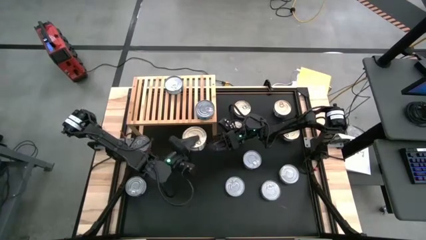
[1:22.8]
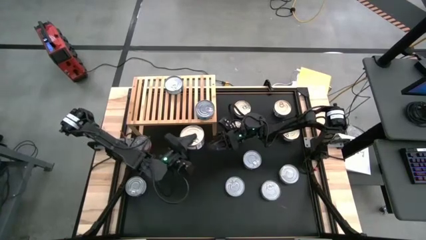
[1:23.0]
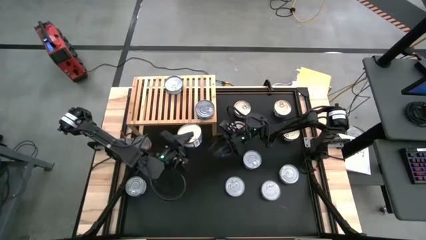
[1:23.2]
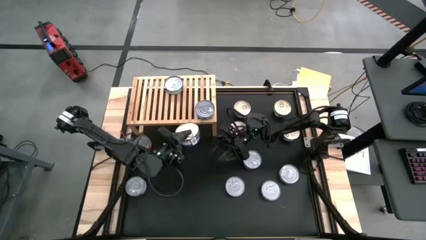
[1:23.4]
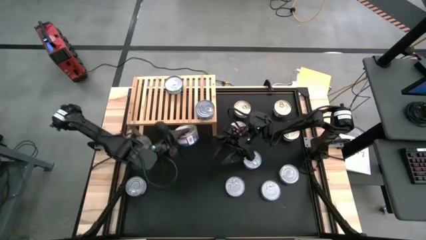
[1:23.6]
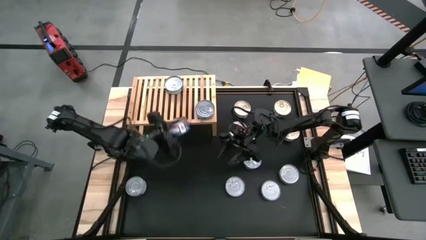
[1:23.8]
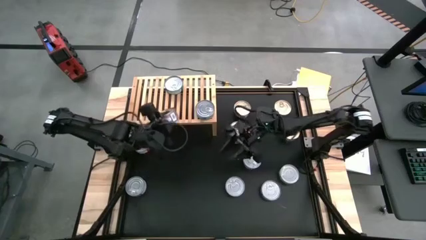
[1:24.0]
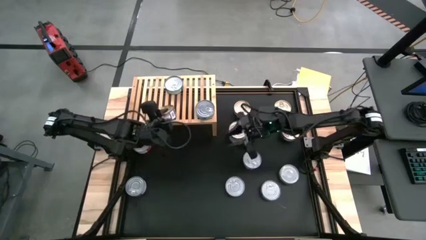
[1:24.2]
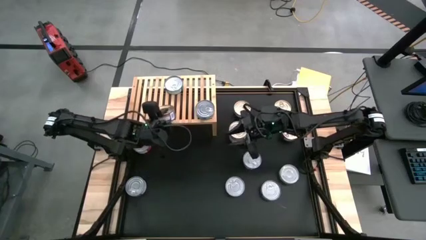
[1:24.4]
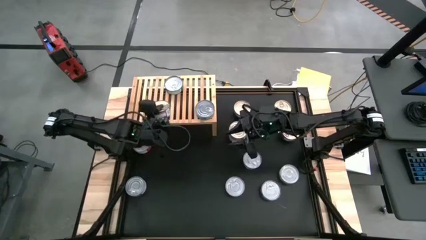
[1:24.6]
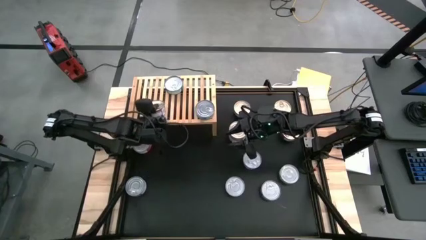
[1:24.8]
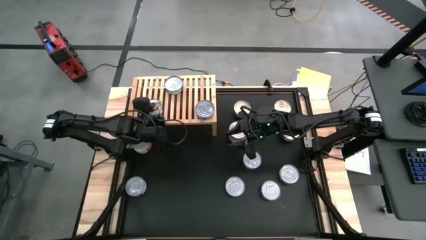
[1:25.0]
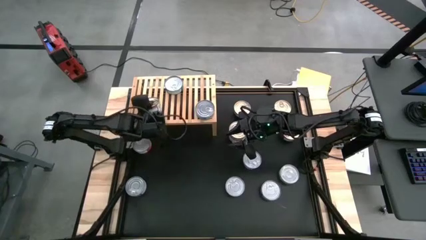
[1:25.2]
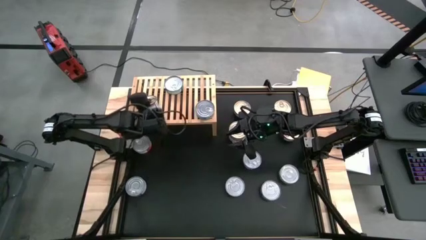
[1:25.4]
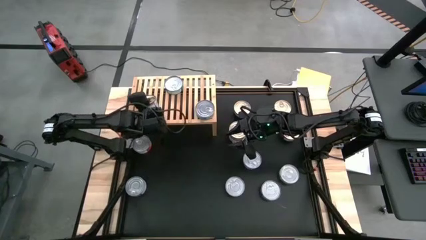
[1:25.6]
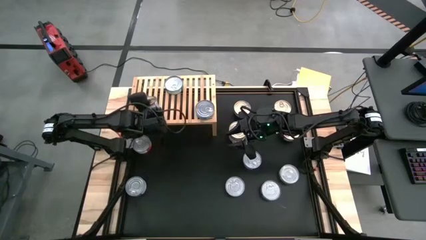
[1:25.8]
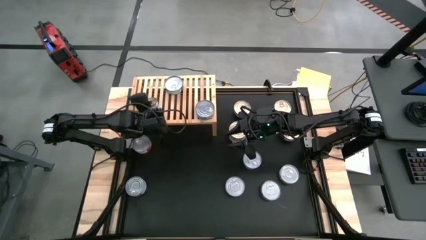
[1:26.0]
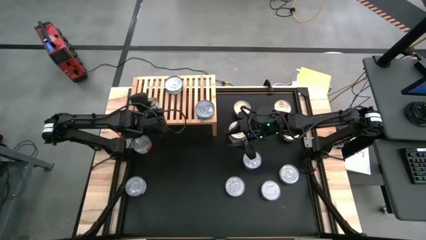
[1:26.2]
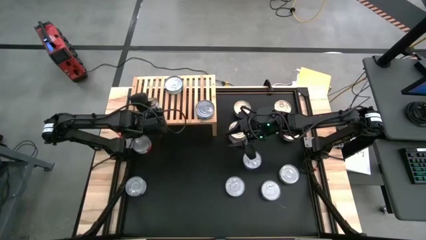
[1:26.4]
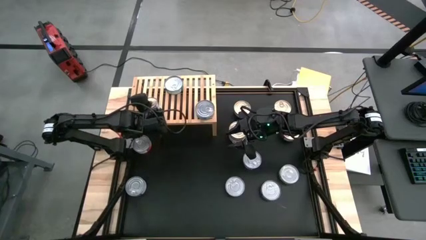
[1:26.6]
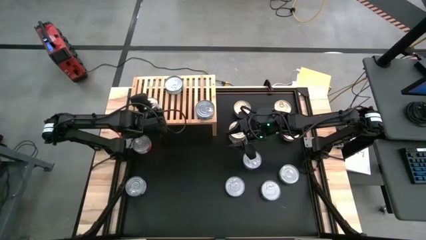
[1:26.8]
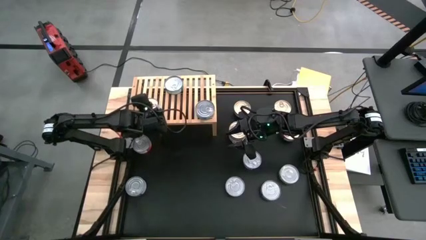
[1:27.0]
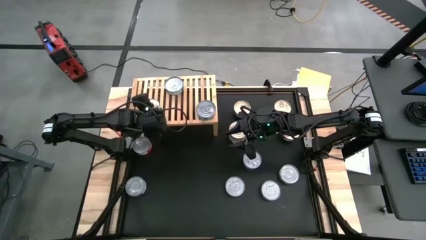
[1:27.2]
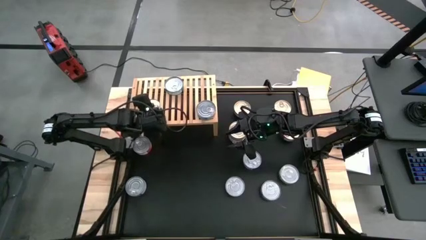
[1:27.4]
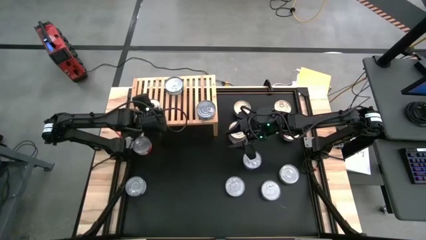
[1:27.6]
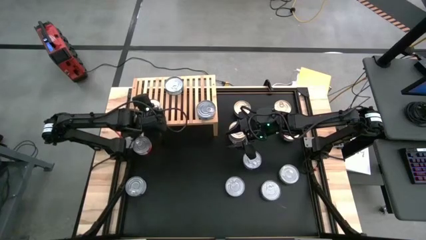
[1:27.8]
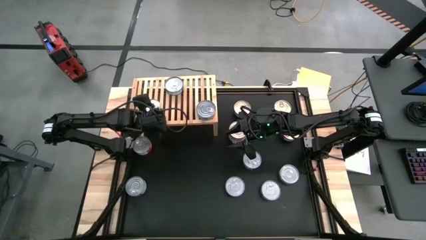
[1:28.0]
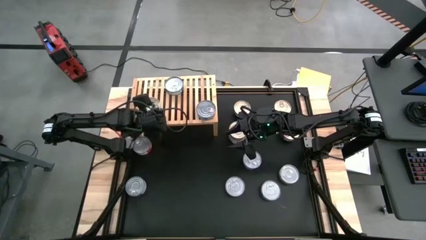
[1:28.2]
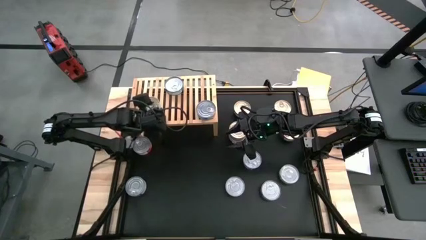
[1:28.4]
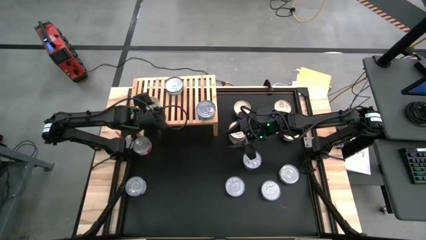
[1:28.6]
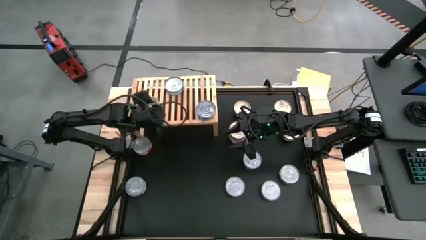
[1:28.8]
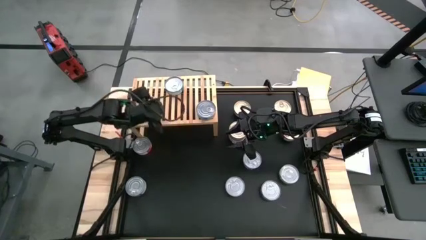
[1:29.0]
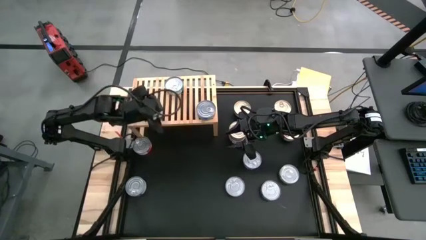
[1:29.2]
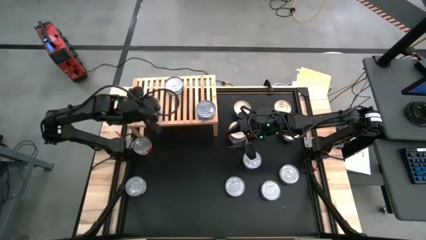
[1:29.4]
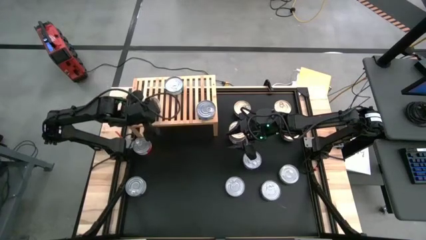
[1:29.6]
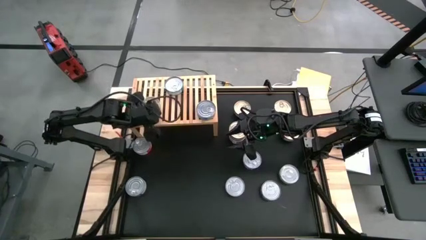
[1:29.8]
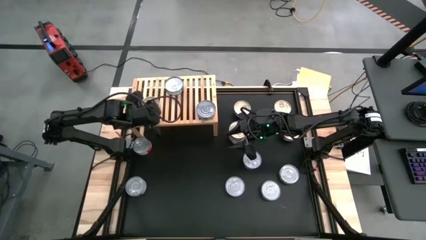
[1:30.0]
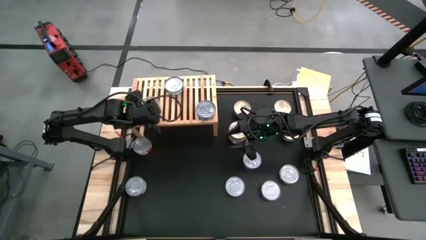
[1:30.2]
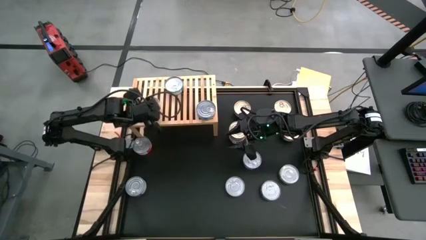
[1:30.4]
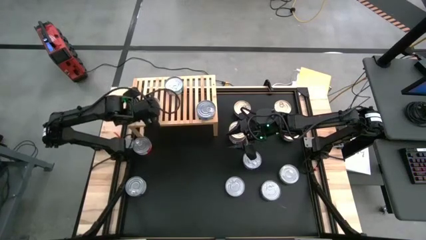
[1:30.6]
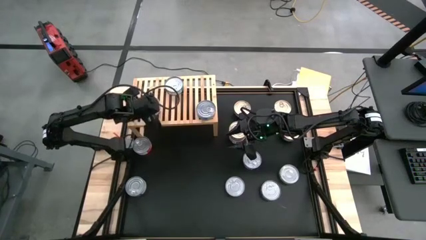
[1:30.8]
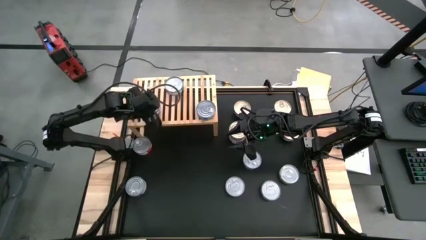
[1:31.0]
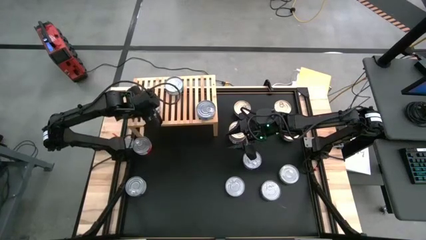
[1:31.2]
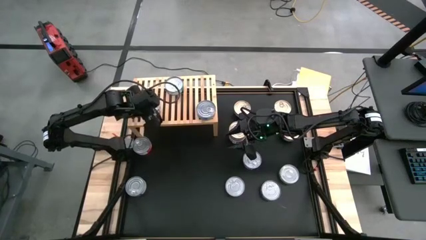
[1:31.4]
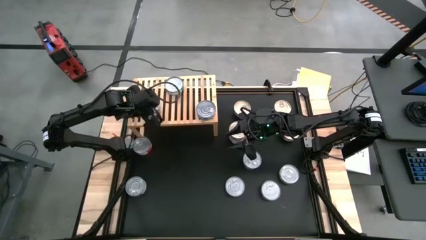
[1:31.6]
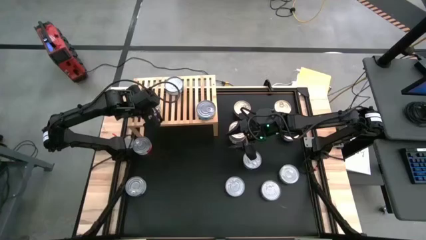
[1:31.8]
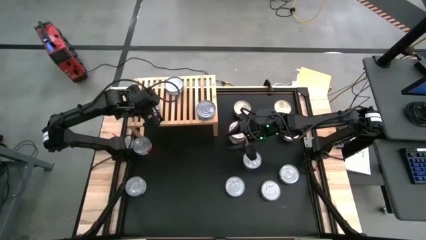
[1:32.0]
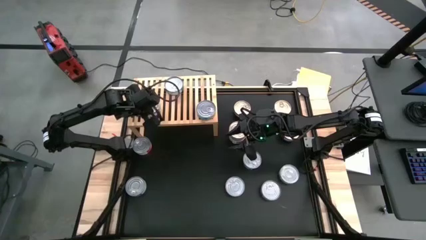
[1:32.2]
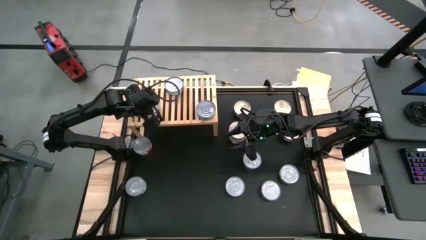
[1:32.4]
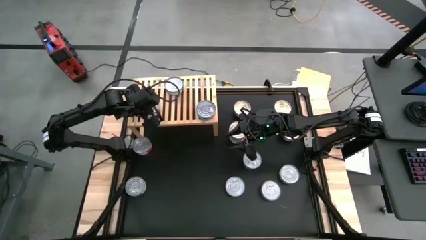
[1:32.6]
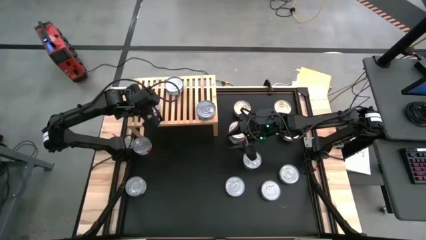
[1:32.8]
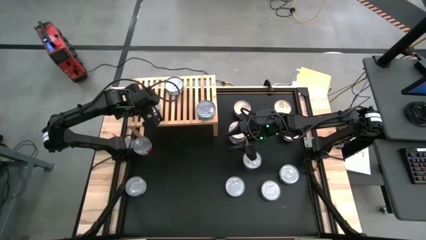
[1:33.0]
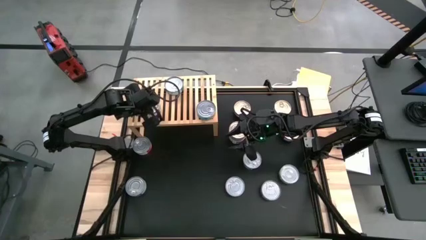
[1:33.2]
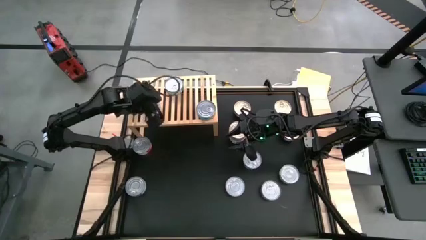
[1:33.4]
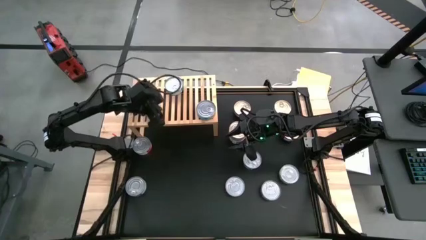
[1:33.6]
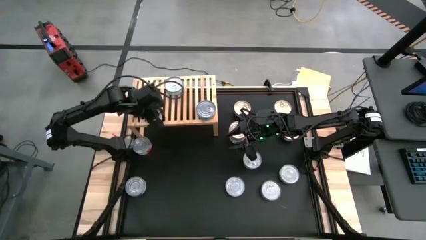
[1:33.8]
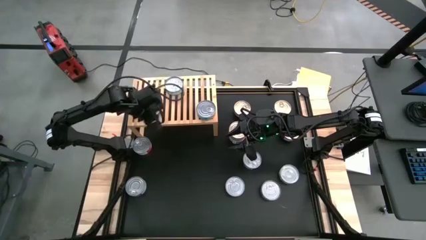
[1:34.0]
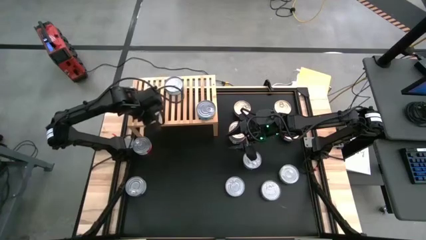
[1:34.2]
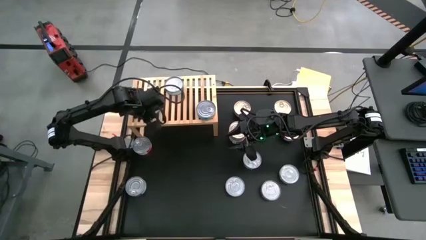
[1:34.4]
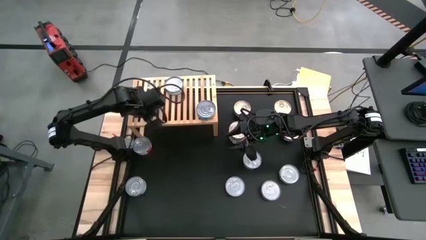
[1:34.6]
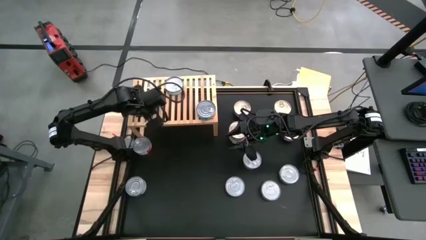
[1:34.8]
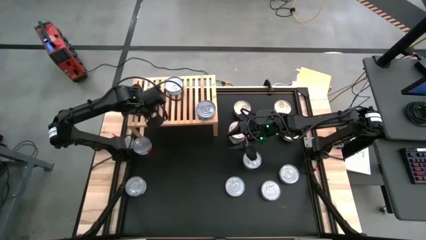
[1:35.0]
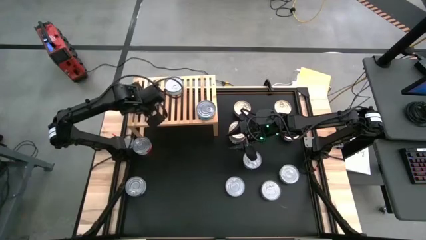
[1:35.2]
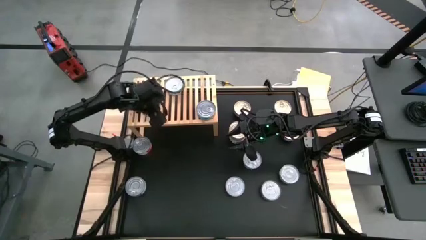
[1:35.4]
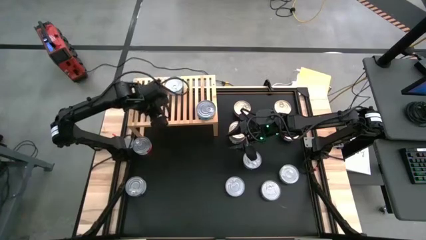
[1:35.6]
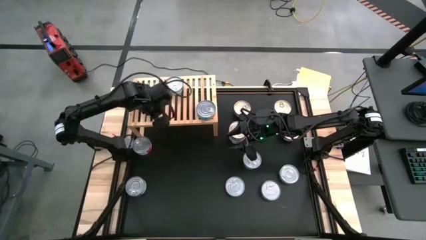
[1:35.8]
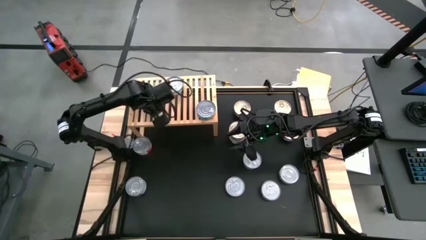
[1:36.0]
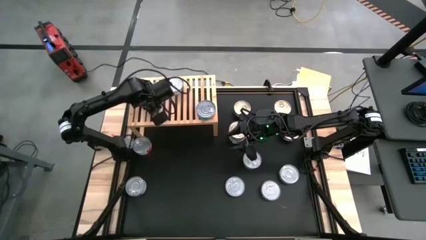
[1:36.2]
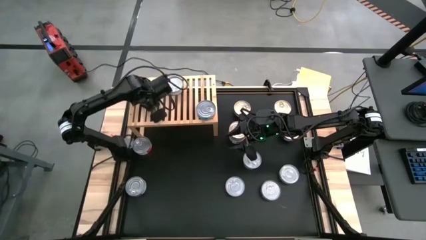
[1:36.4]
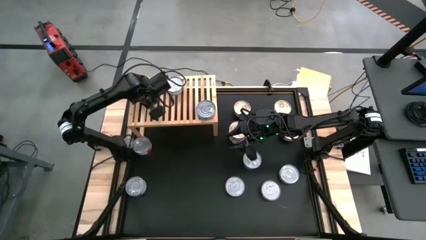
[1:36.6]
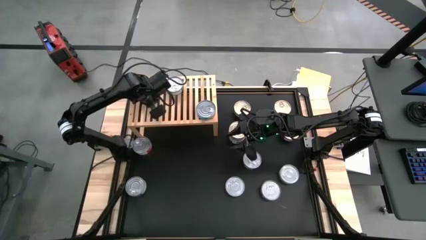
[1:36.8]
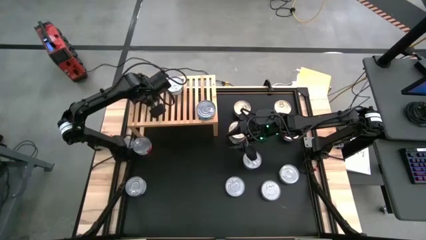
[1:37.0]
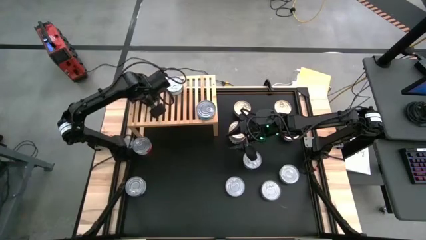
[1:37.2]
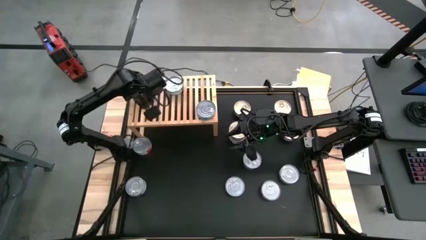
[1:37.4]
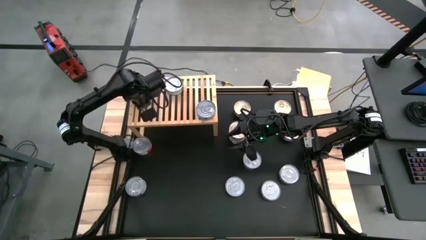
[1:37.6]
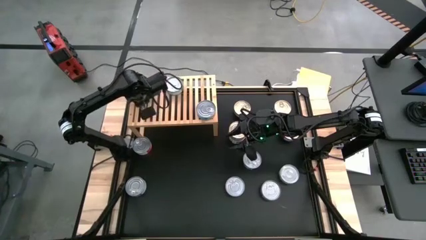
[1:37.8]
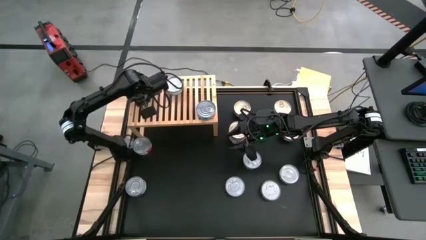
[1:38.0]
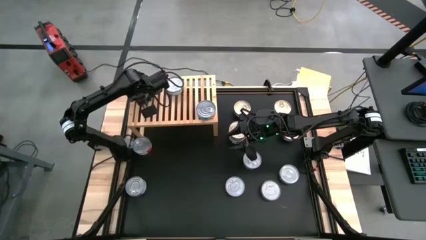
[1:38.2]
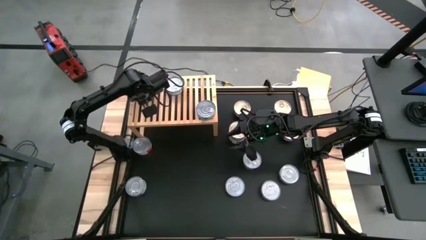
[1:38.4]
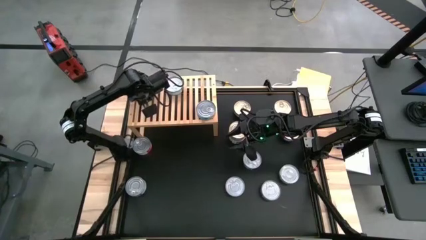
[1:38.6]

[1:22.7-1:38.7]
Task: Stack canned seafood by type on shelf
Put the blue pink tuna can on the shelf
